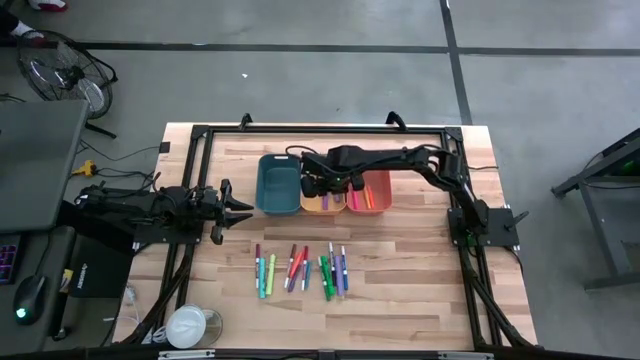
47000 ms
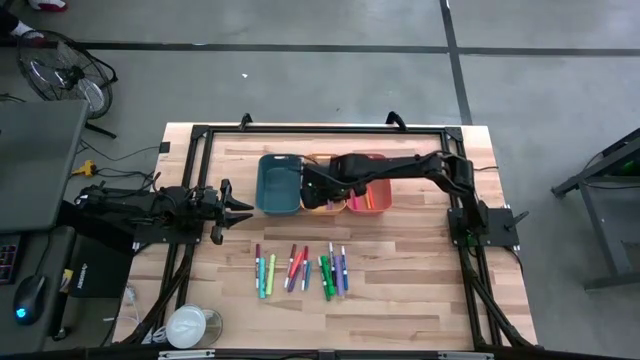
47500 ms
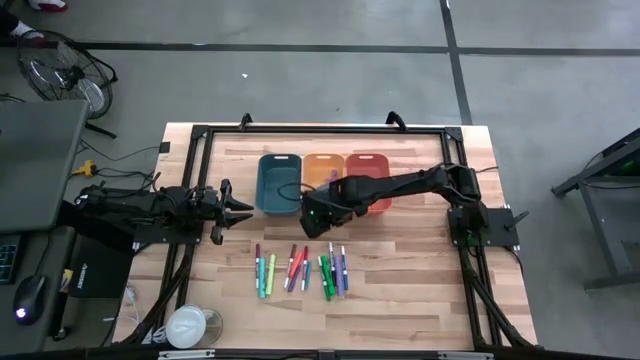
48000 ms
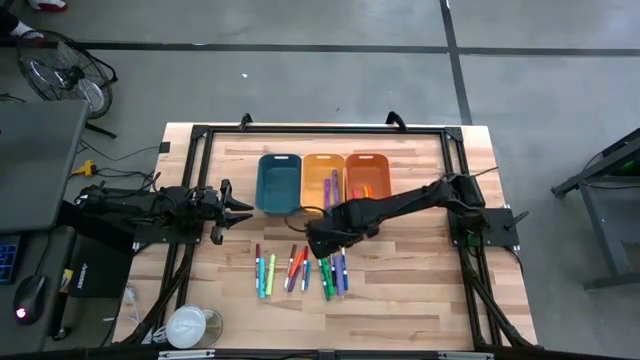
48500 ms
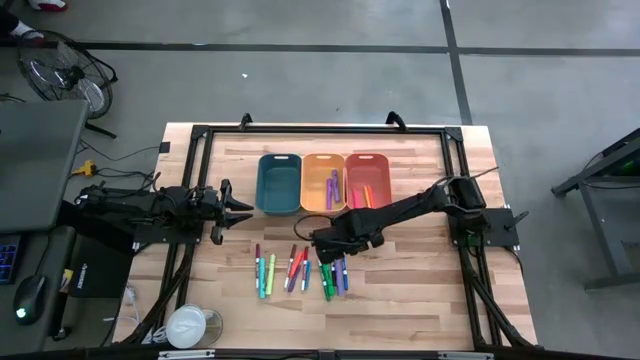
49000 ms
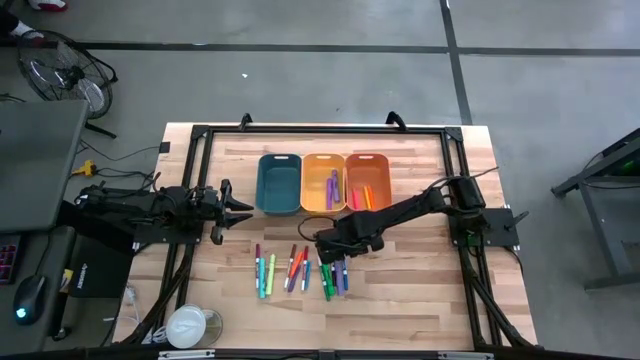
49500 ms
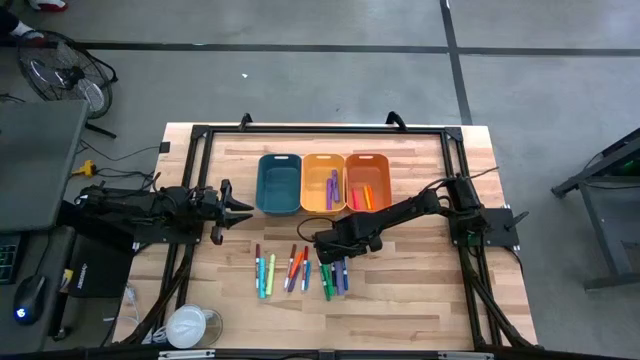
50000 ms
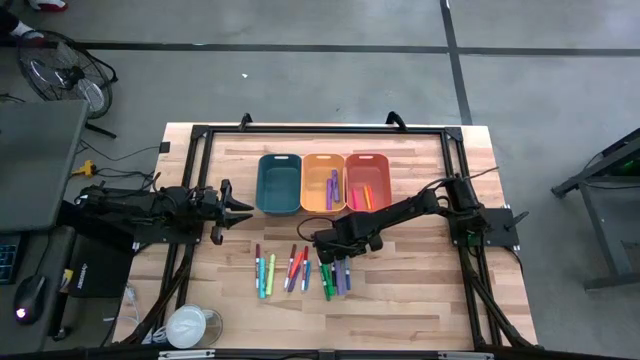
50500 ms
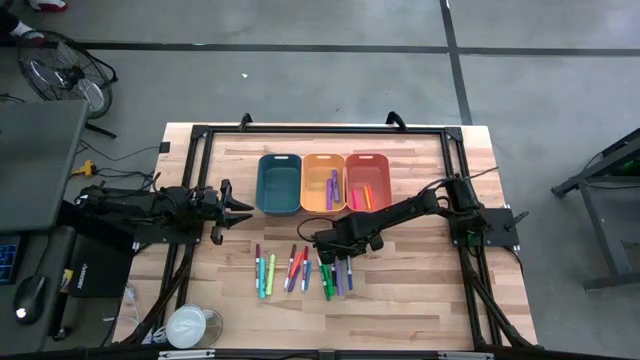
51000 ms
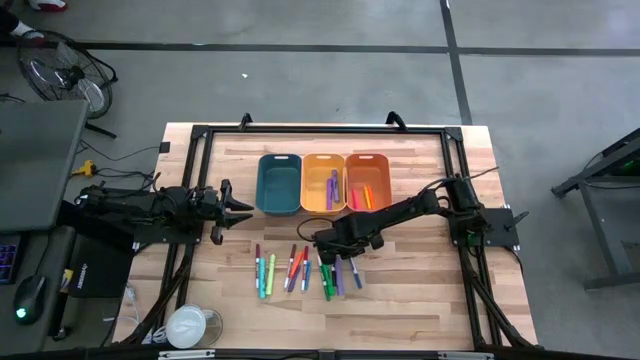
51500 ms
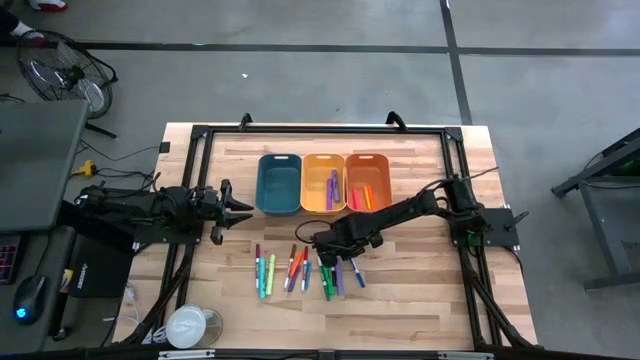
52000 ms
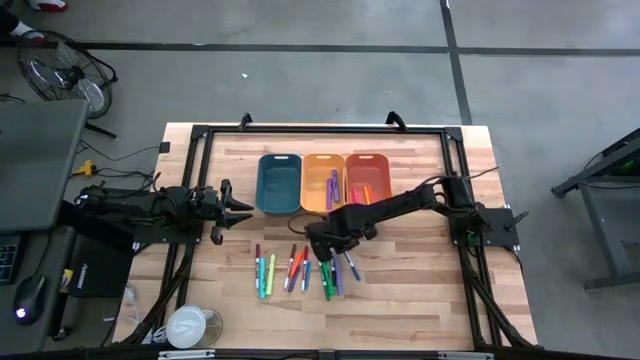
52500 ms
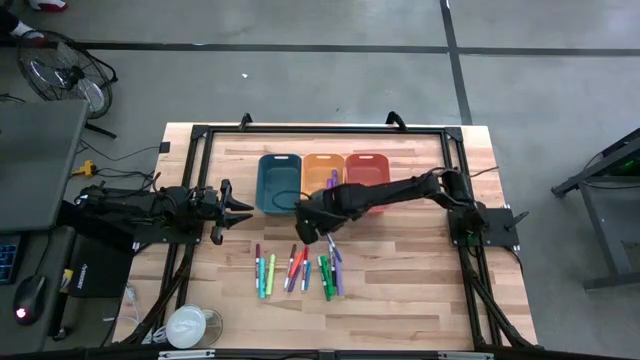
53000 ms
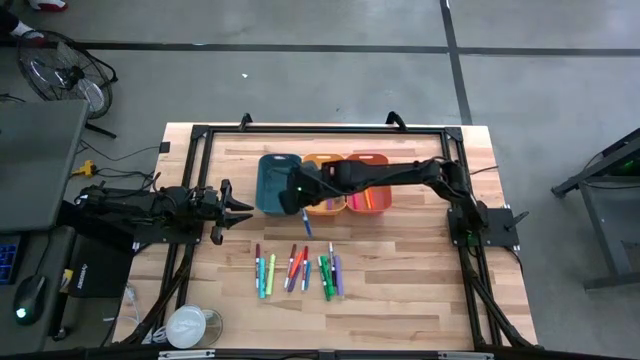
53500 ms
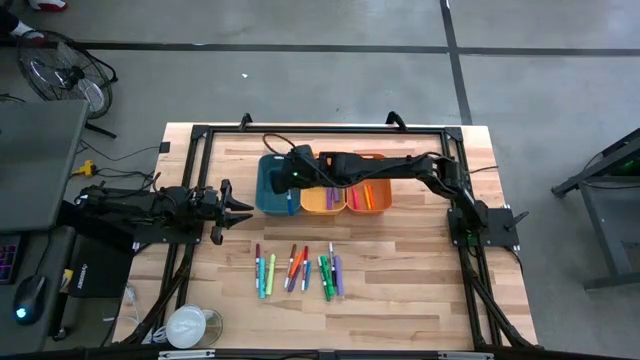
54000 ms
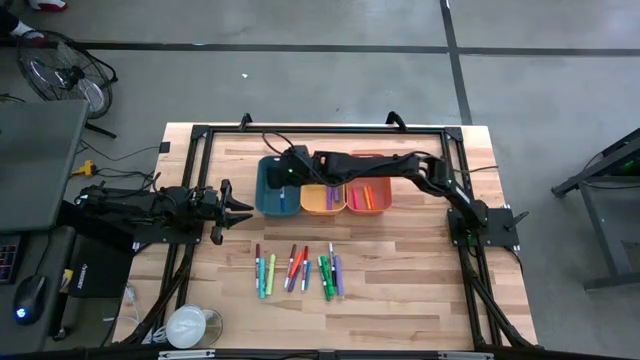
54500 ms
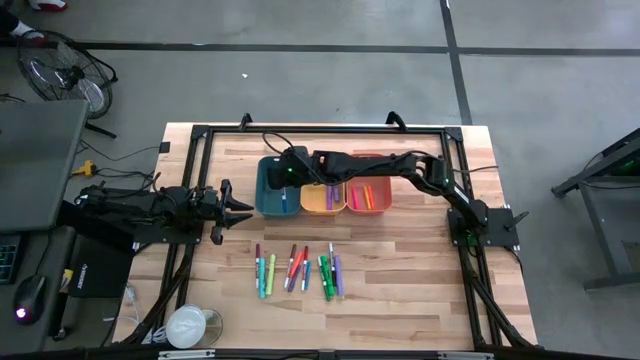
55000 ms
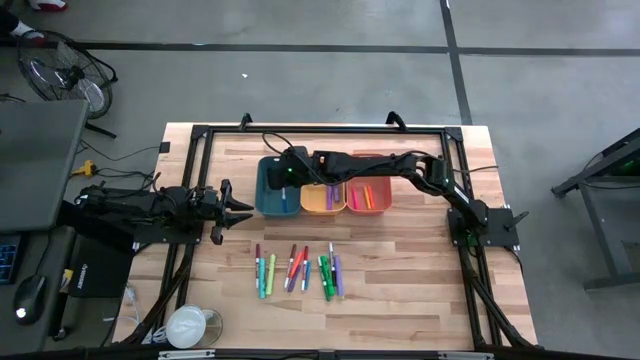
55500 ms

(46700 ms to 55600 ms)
Task: Pick & Place Markers
Put the blue marker pen into the blue bin

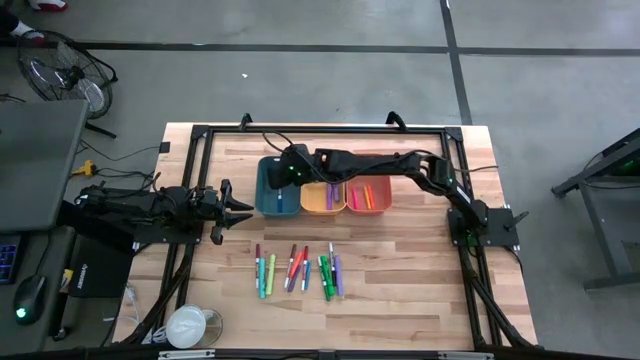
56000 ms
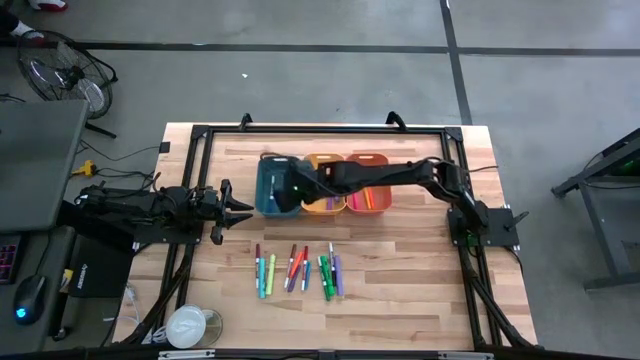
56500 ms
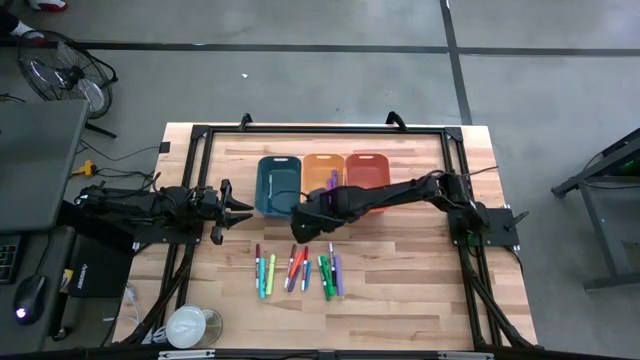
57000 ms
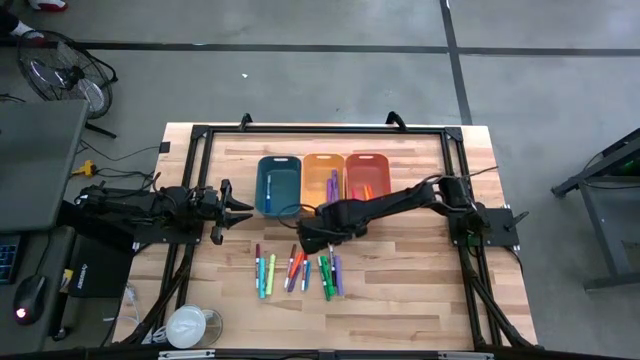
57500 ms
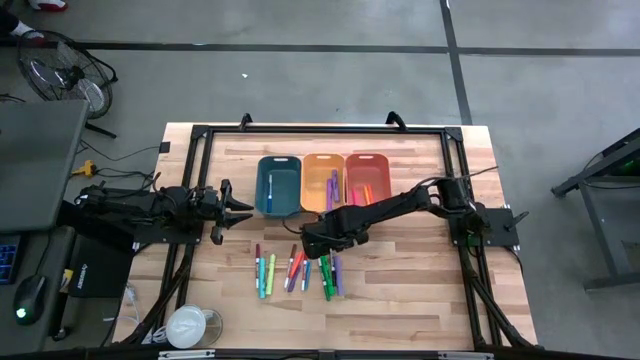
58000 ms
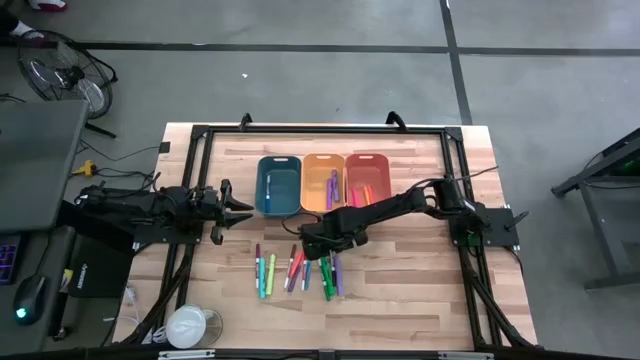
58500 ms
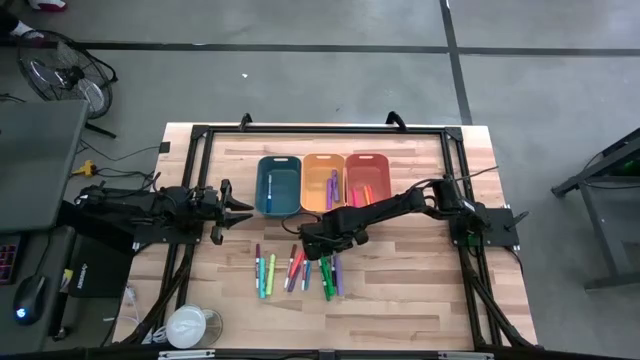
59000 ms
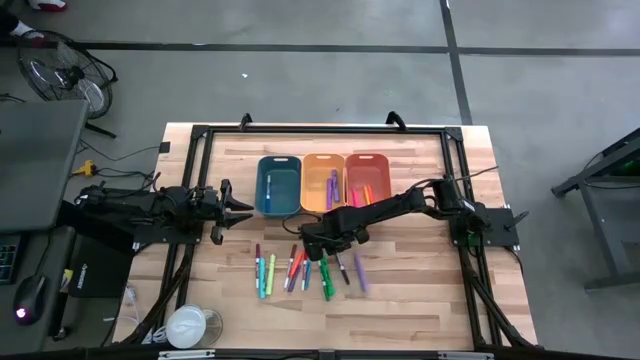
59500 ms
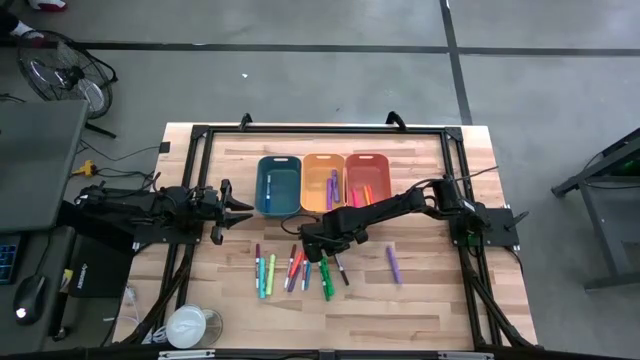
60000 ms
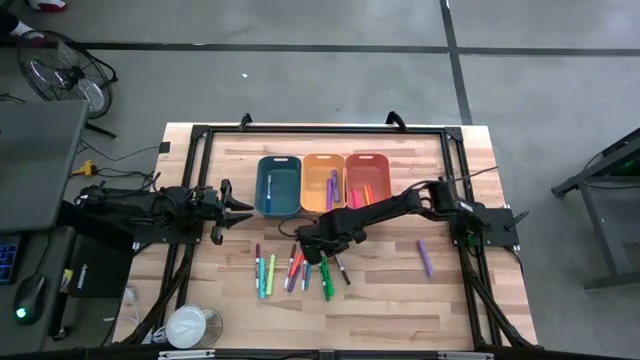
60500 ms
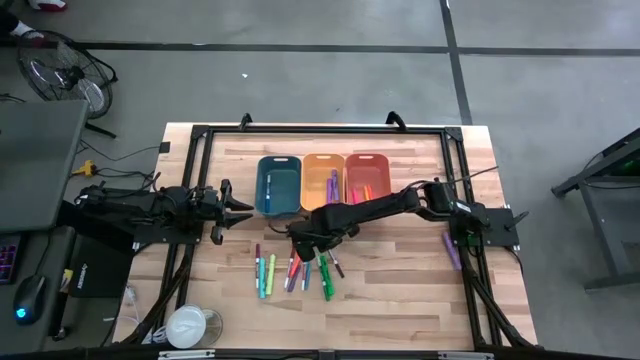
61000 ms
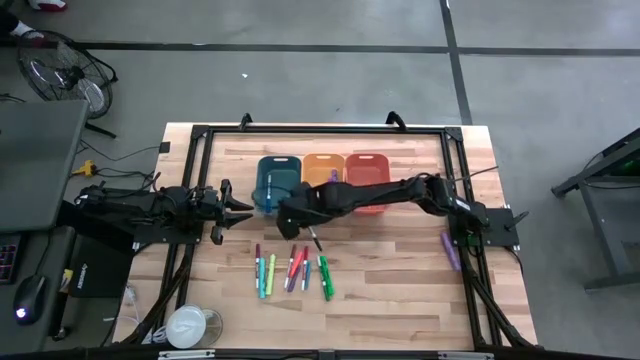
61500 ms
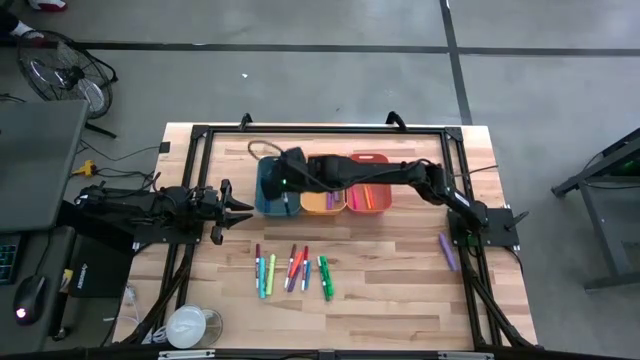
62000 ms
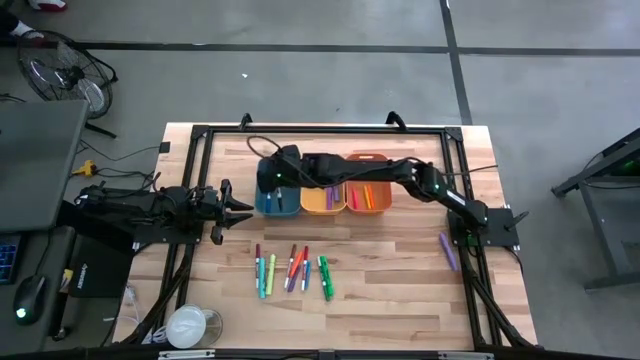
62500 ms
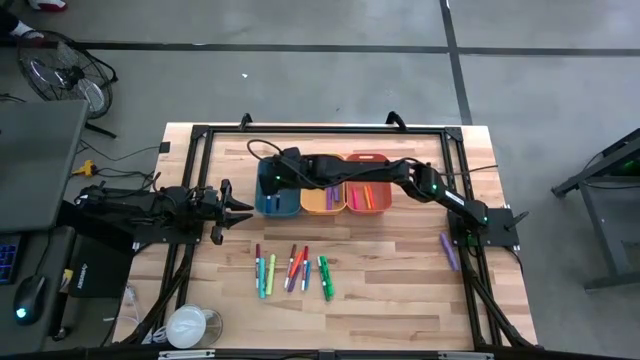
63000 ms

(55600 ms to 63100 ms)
Put the black marker pen into the blue bin

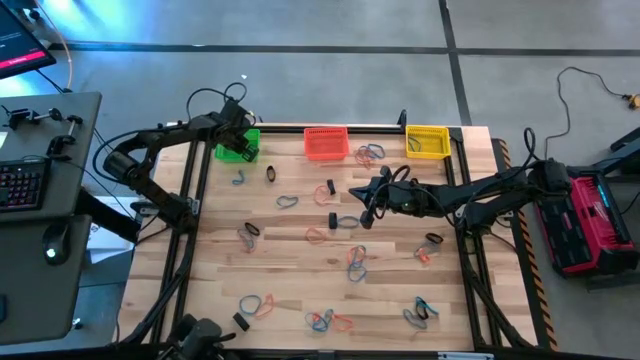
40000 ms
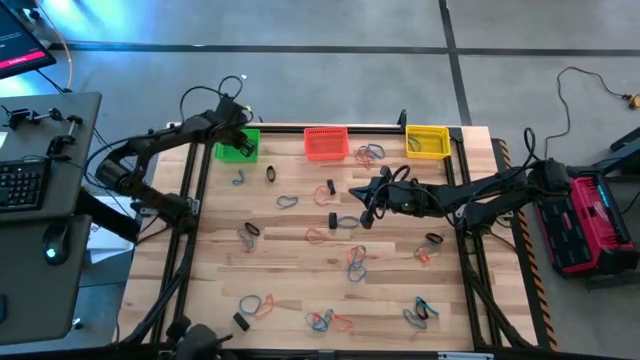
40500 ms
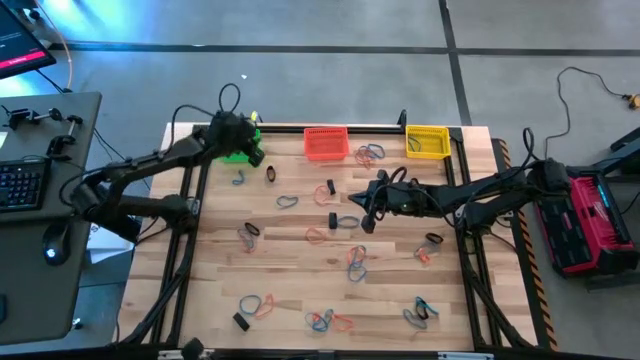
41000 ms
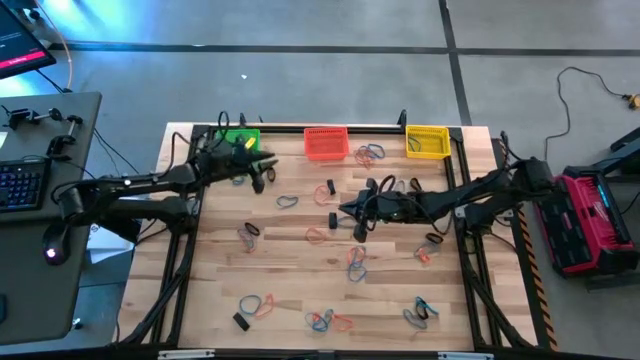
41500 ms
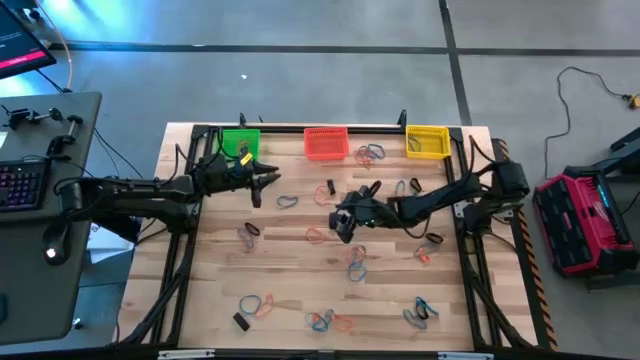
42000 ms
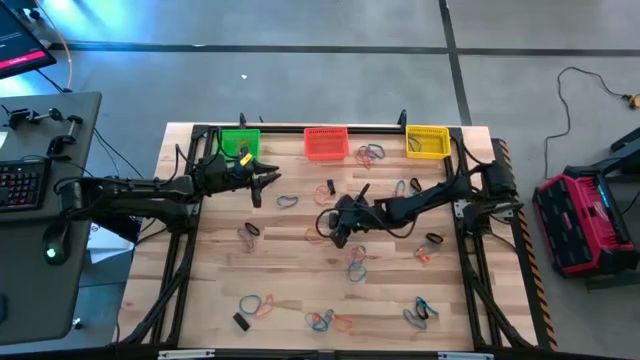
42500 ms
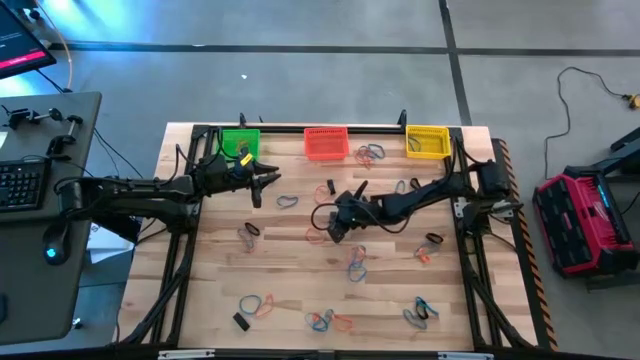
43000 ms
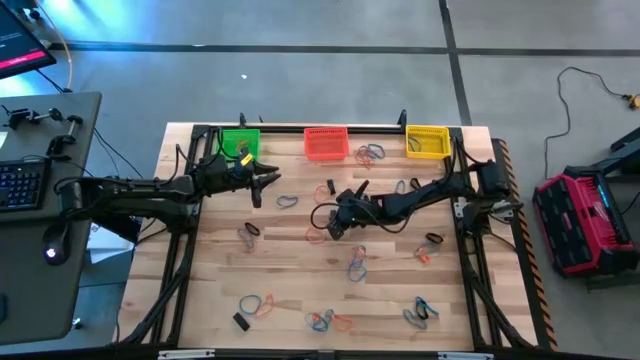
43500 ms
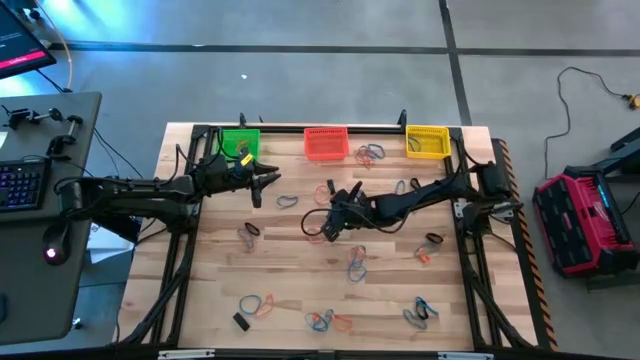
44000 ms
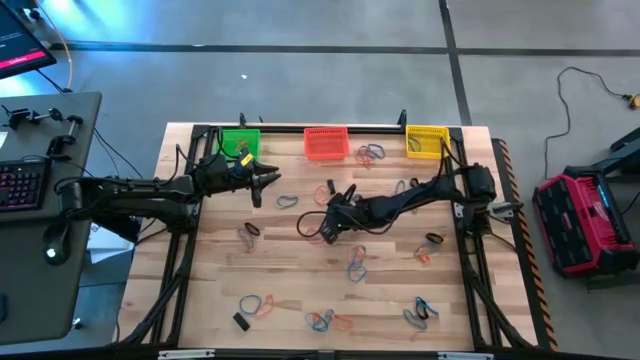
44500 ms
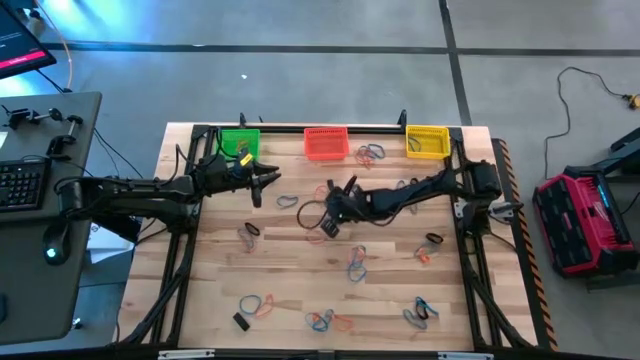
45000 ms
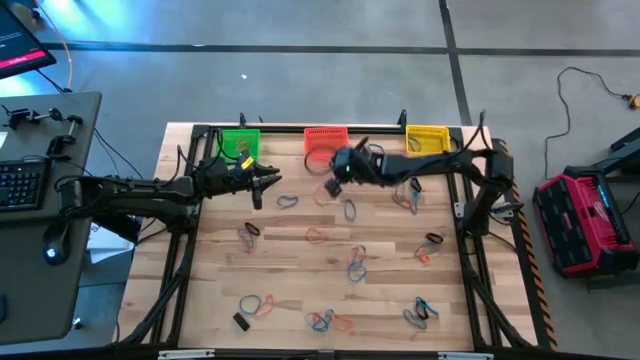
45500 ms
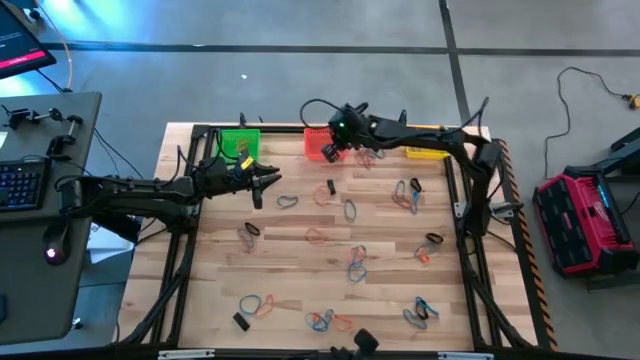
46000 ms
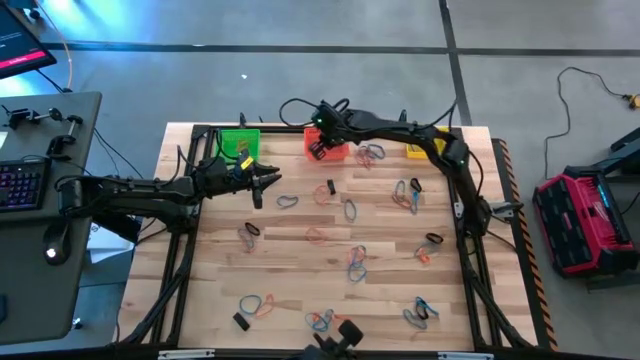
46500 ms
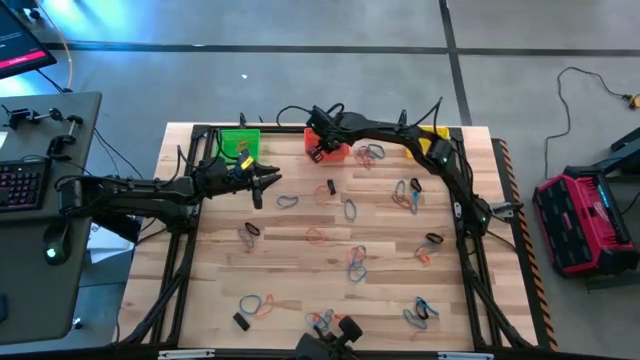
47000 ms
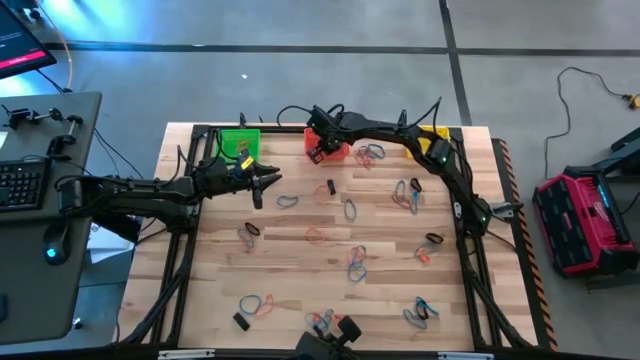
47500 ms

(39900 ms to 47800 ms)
Task: Sort rubber bands into baskets
Put the black rubber band into the orange bin
